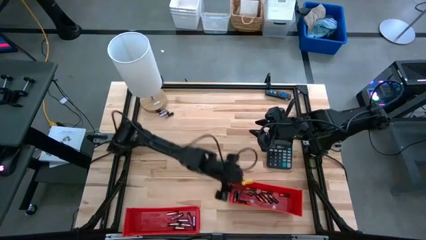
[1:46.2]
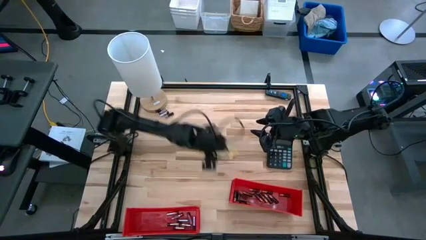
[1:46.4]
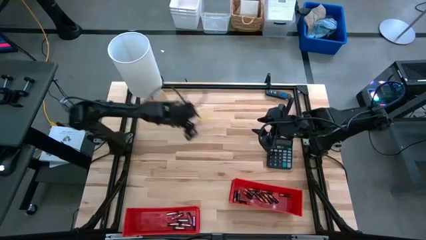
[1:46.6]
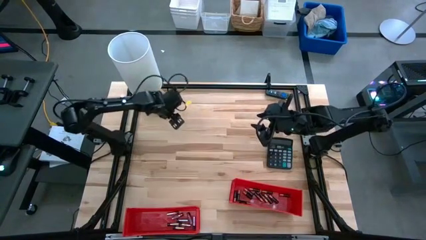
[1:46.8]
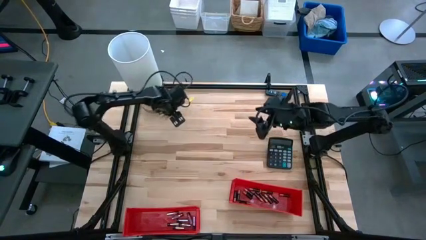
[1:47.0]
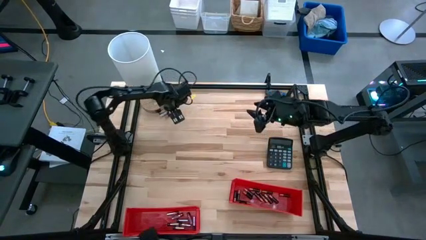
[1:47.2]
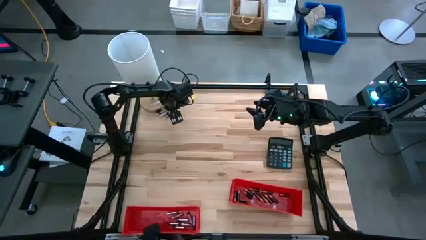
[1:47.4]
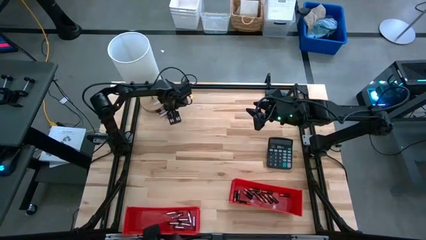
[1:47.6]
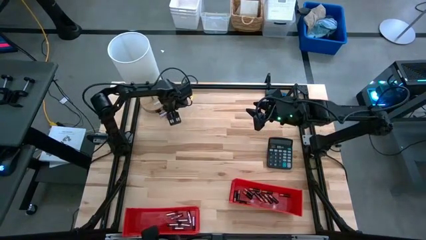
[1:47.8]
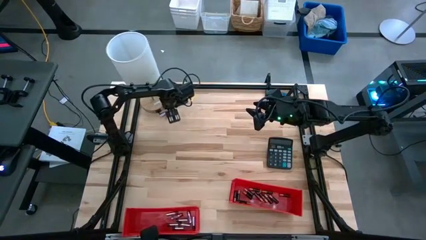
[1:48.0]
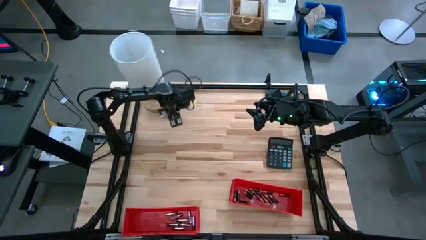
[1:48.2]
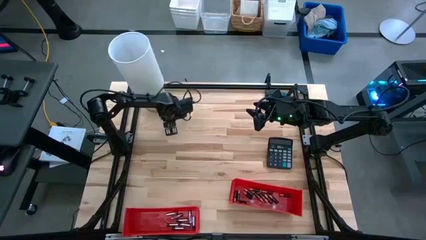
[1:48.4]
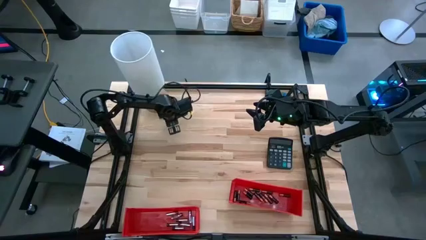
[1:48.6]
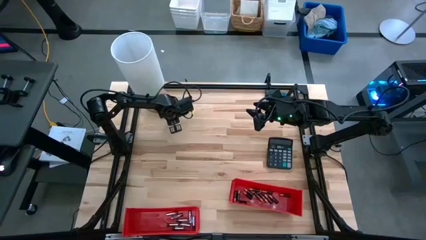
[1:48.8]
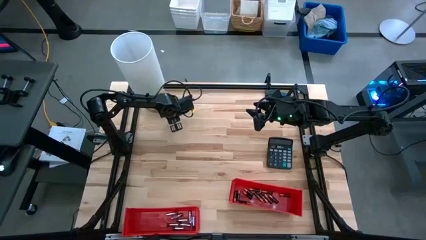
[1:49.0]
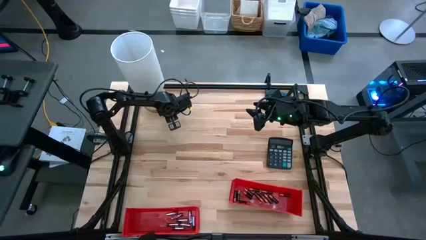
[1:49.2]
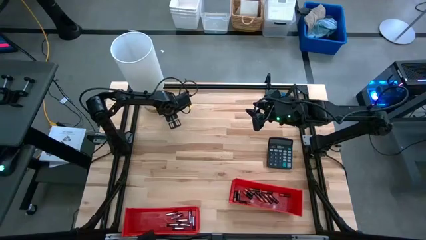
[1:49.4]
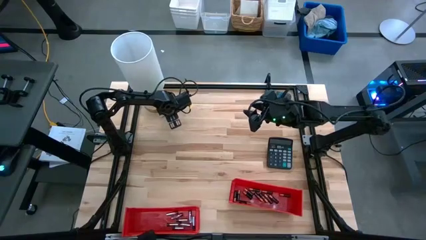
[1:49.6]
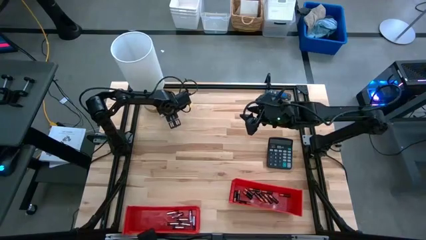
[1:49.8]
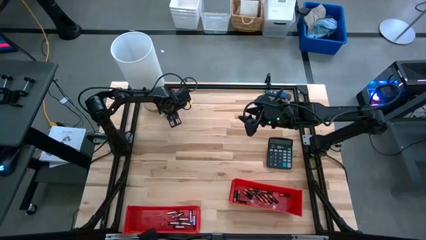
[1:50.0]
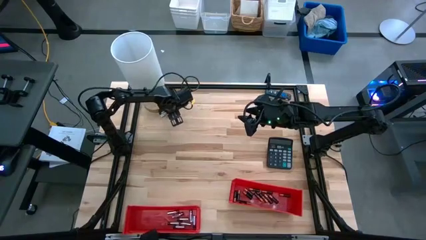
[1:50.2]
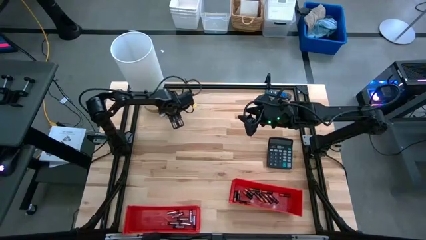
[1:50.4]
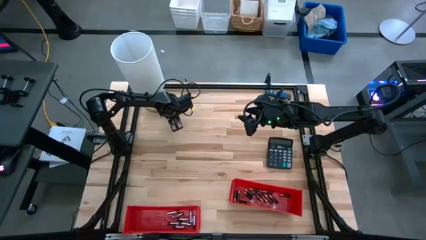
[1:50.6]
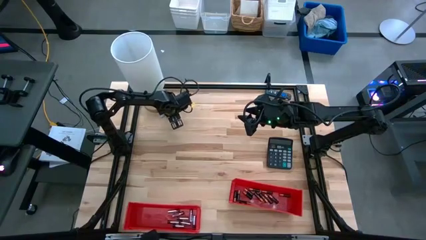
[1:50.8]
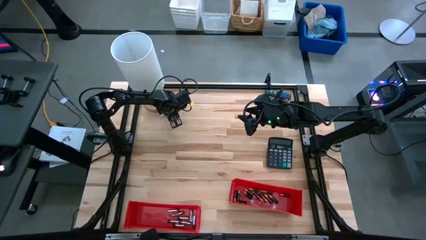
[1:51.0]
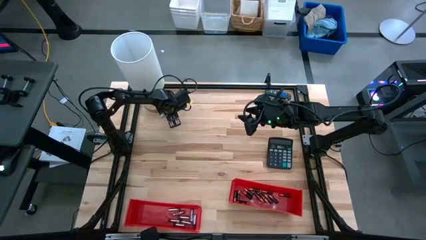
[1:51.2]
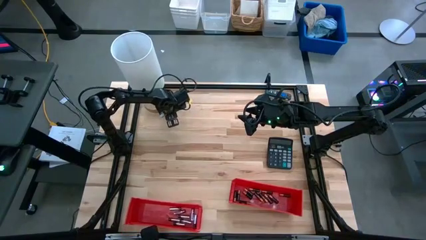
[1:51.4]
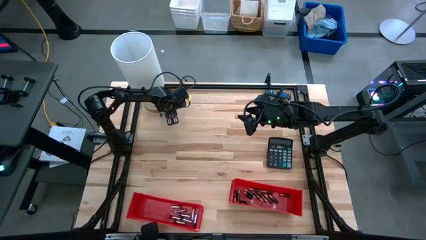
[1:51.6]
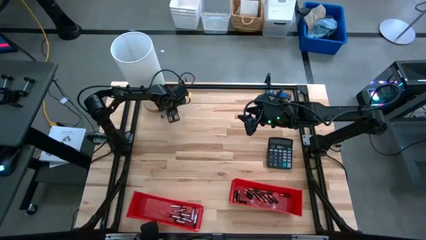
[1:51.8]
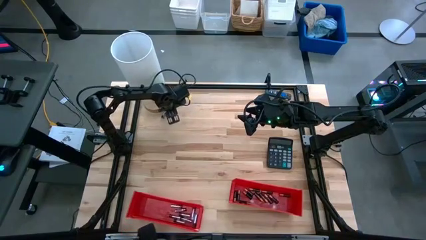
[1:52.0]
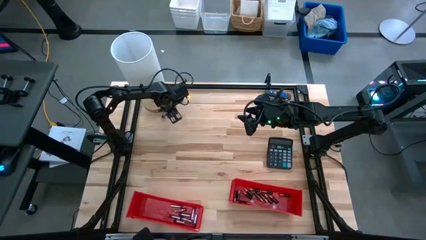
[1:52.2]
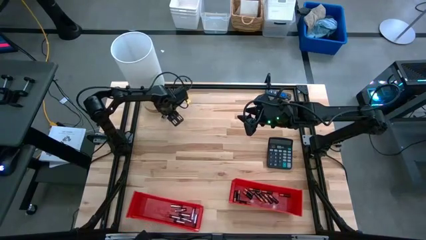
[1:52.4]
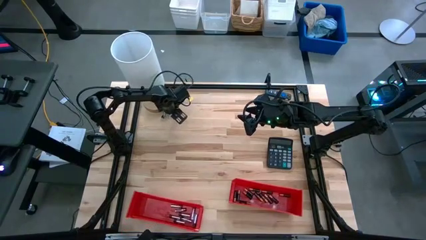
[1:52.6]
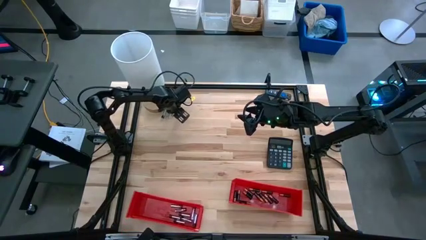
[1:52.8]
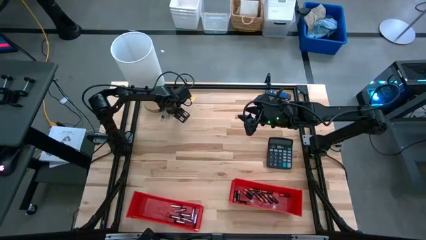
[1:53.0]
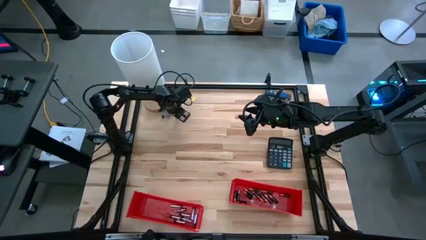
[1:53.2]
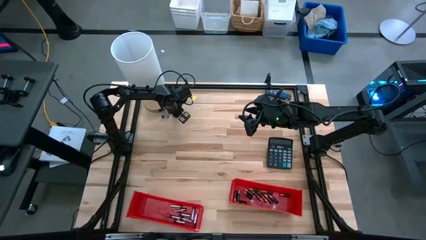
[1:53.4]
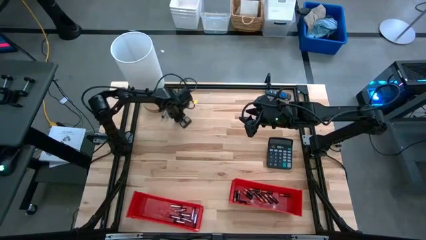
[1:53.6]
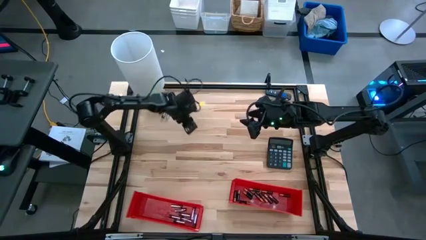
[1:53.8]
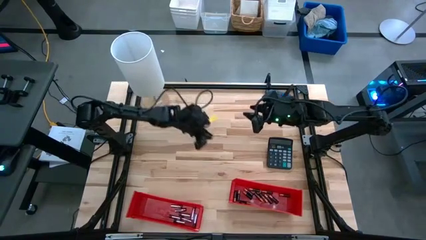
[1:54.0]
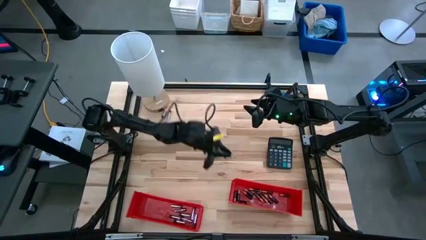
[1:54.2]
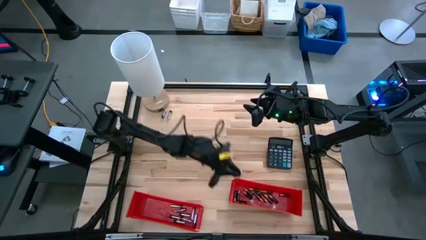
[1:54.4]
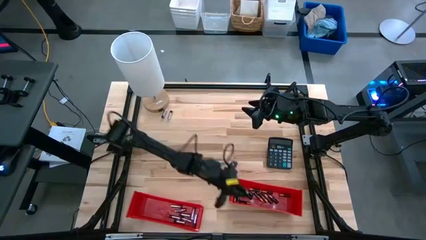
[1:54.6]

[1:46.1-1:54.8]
Task: Sort batteries
Put the black-brown battery into the right red bin

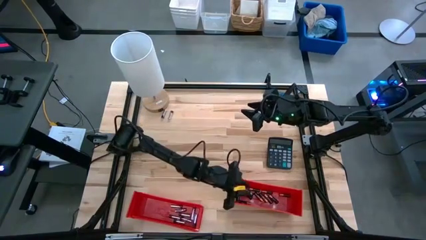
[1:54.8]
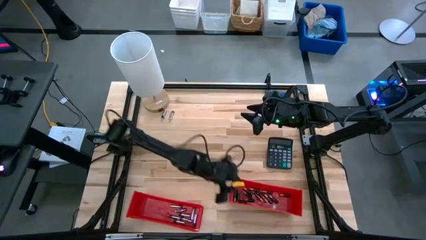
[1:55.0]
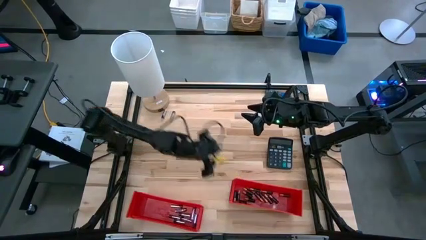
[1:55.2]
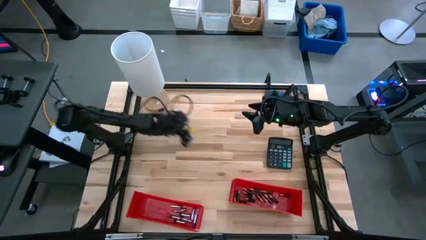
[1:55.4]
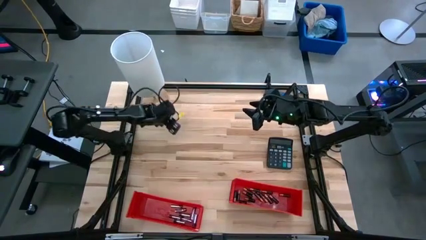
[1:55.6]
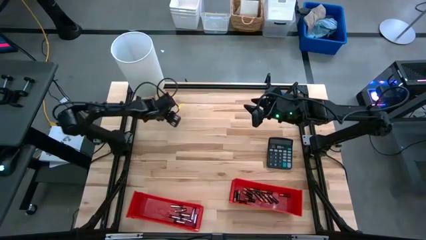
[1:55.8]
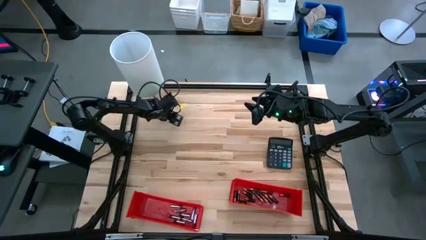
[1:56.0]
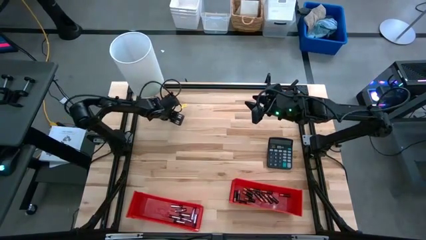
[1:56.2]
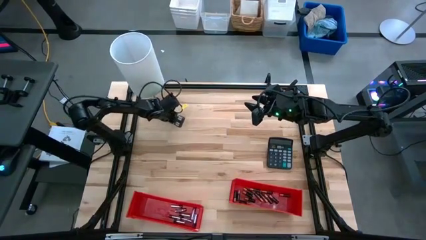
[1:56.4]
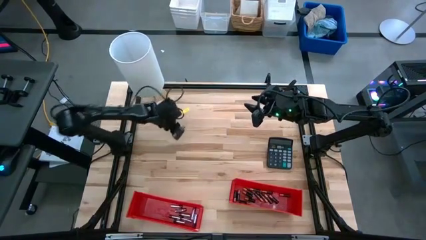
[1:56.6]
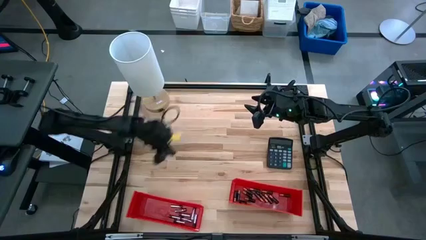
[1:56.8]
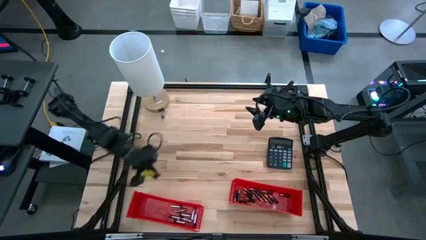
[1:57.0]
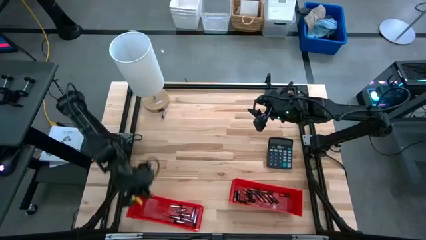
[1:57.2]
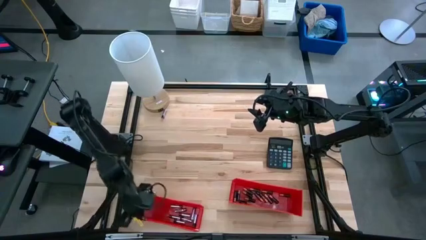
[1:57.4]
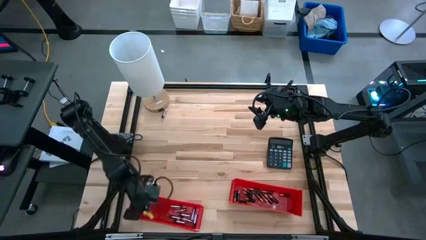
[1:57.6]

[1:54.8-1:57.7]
Put the silver battery into the left red bin

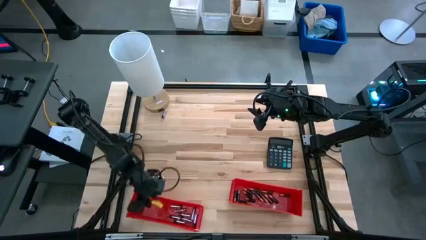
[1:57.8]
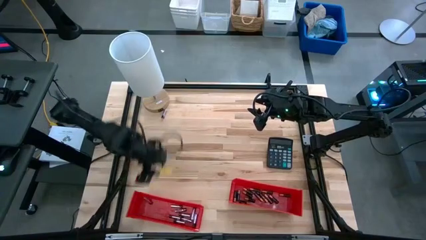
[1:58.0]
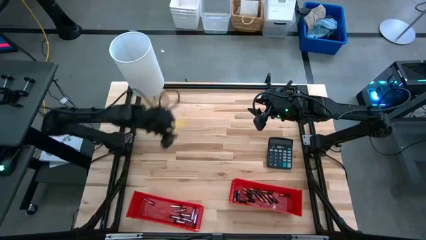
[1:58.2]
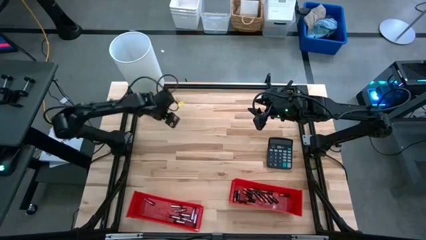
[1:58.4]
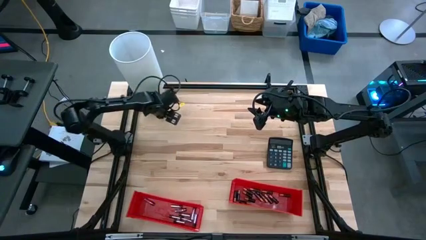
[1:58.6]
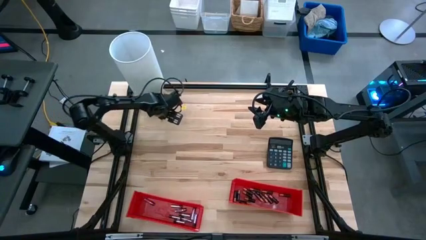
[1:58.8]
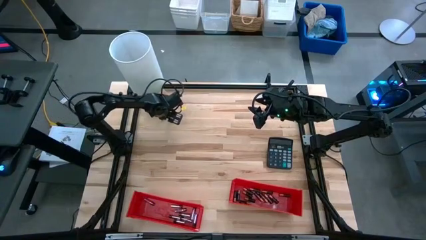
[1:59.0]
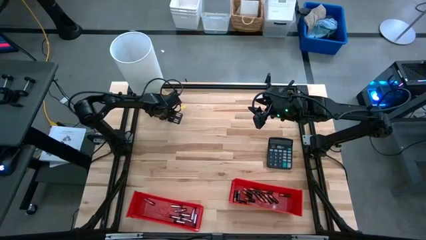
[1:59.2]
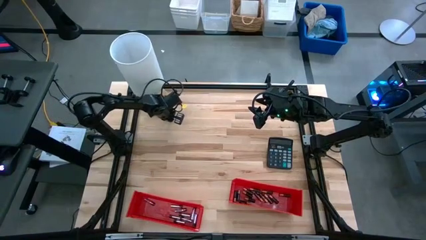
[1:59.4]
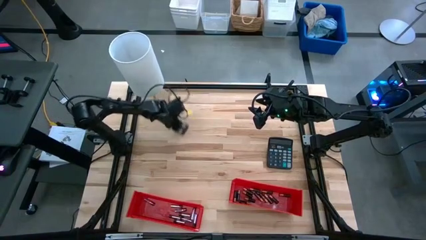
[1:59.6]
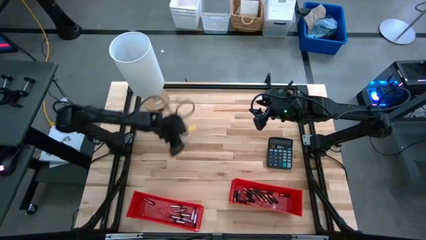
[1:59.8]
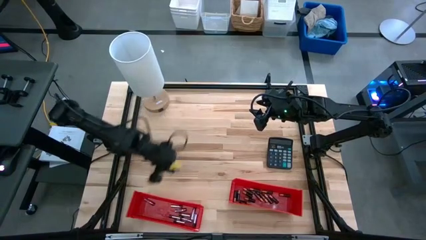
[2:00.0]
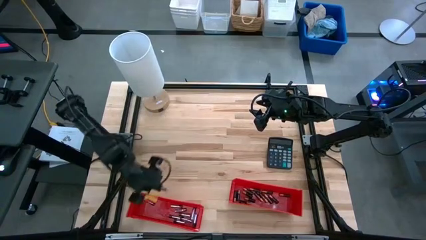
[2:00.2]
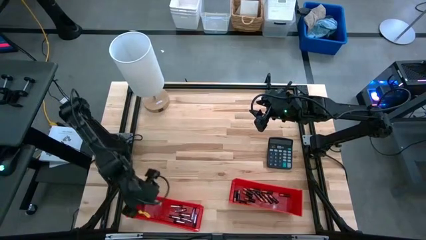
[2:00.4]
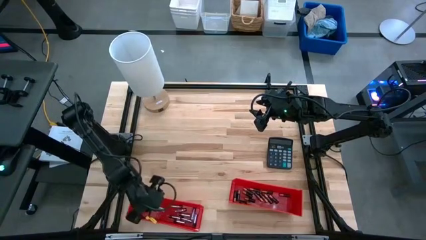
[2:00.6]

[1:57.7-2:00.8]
Put the silver battery into the left red bin

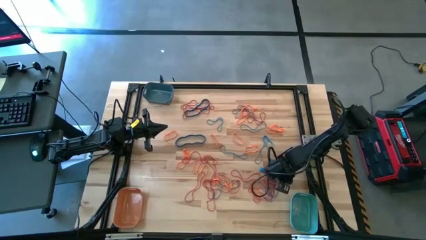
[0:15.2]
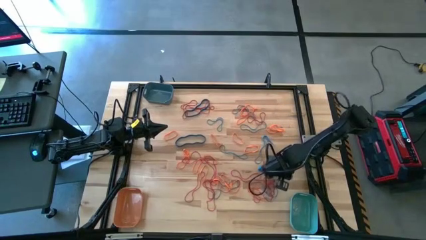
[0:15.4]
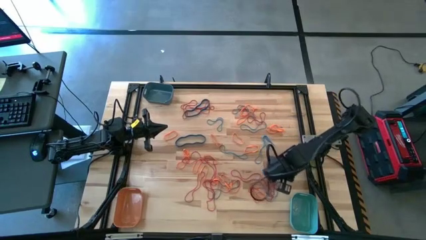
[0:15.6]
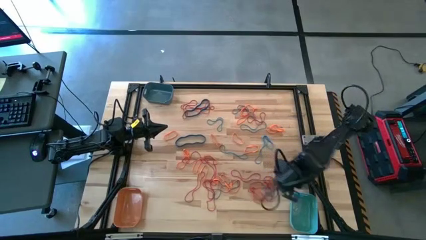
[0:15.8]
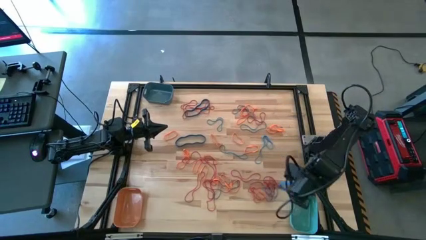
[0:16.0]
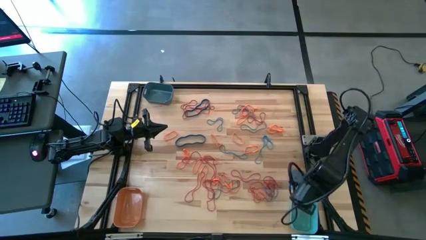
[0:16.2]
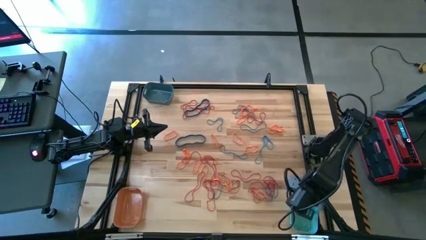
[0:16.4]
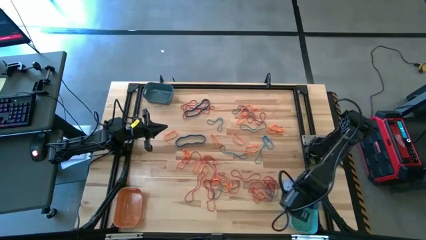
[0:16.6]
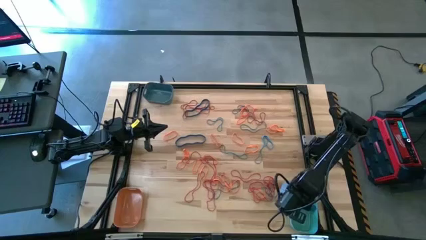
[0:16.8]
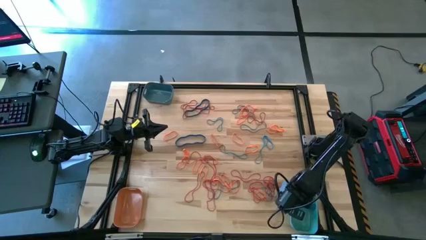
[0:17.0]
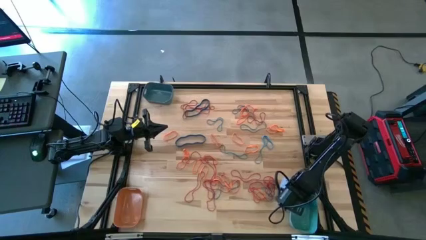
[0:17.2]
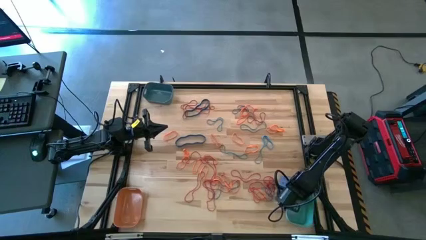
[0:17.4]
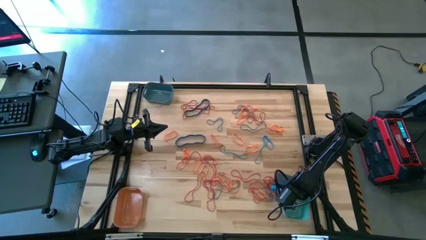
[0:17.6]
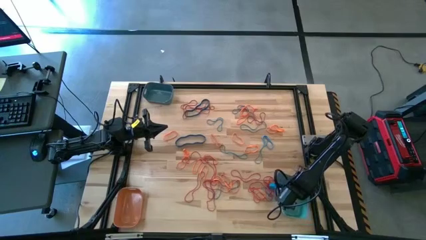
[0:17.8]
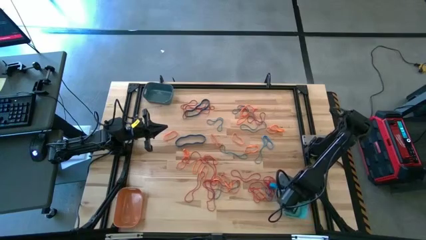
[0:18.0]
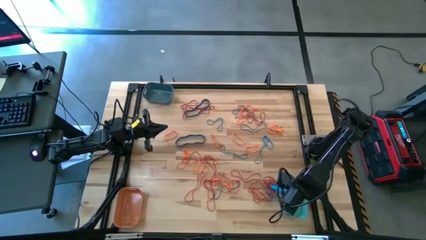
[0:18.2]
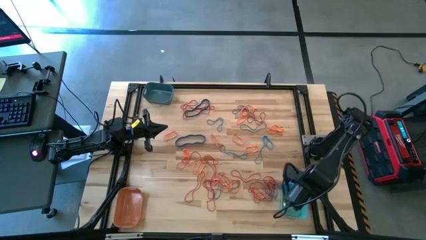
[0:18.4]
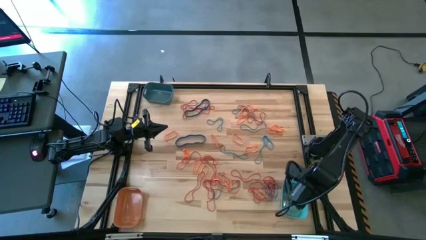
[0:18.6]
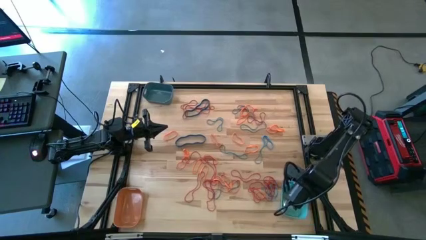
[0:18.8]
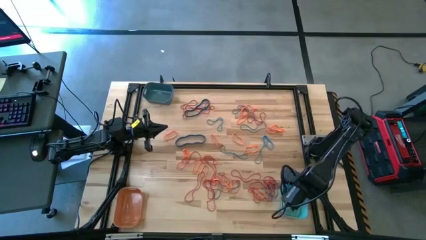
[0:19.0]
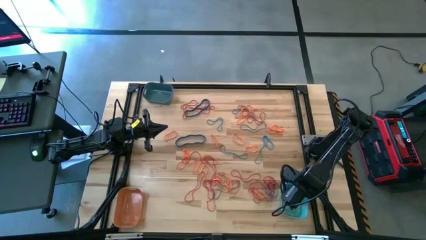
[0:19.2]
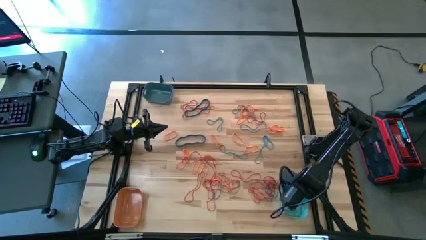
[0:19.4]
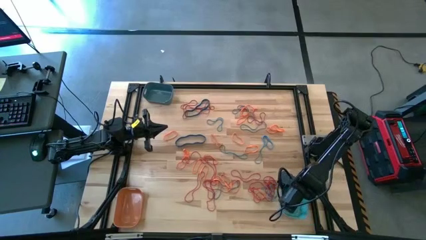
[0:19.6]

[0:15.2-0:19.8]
Task: Sort rubber bands into baskets
Put the blue rubber band into the light blue bin
